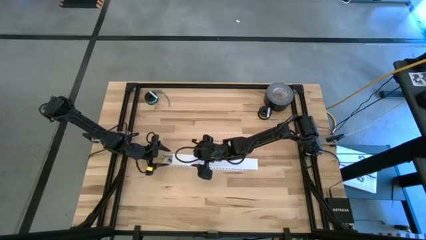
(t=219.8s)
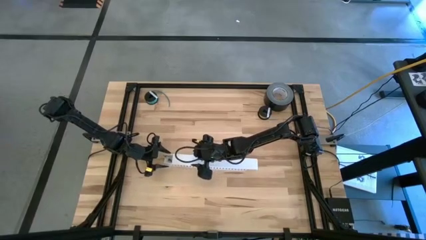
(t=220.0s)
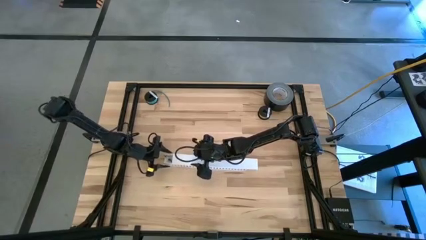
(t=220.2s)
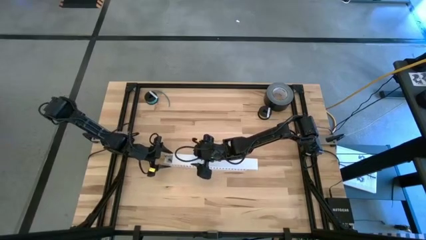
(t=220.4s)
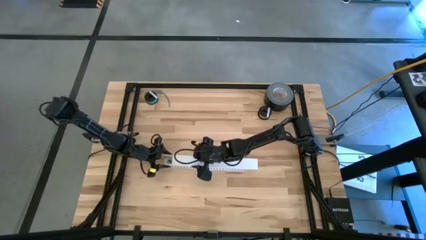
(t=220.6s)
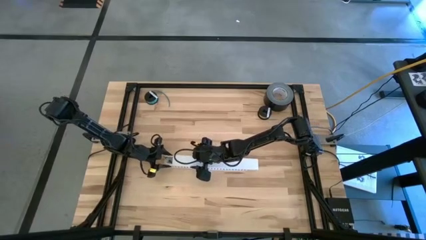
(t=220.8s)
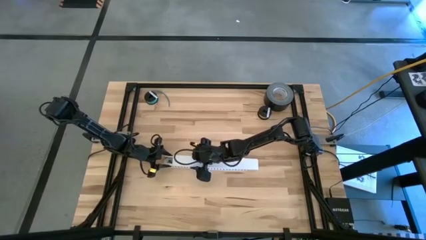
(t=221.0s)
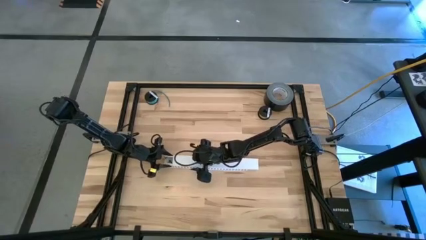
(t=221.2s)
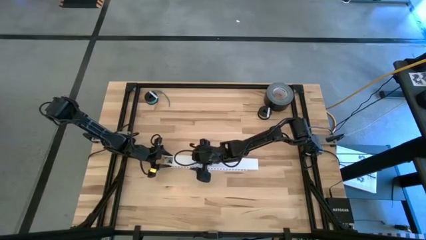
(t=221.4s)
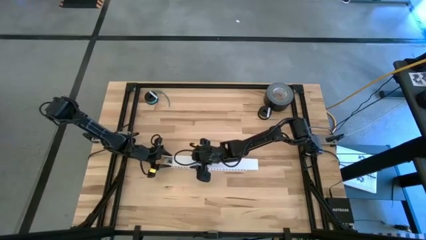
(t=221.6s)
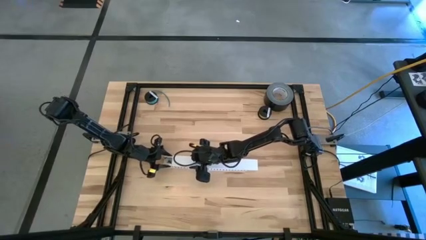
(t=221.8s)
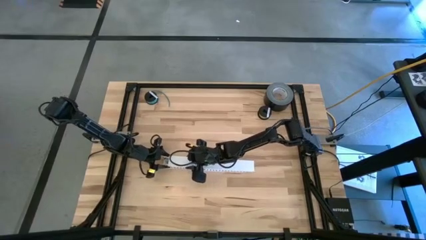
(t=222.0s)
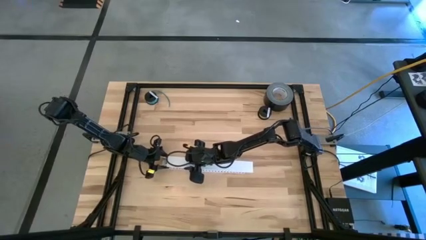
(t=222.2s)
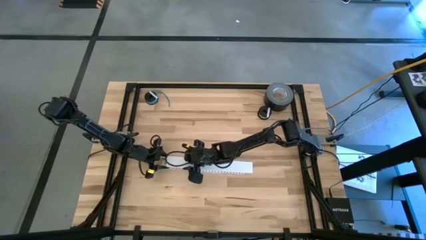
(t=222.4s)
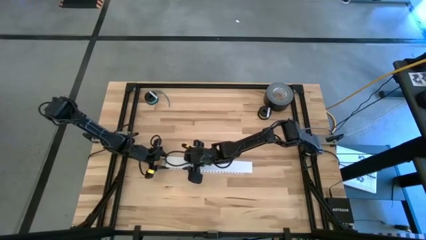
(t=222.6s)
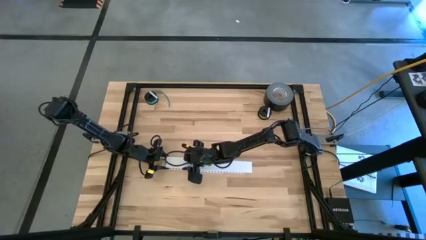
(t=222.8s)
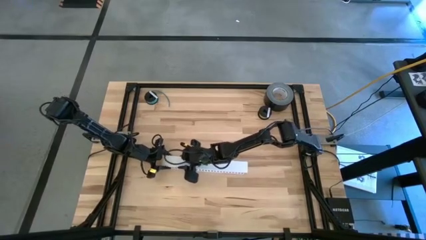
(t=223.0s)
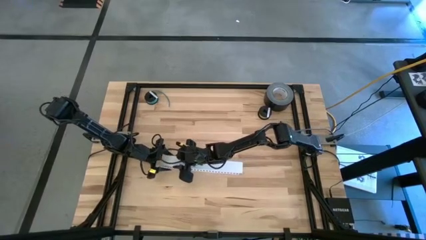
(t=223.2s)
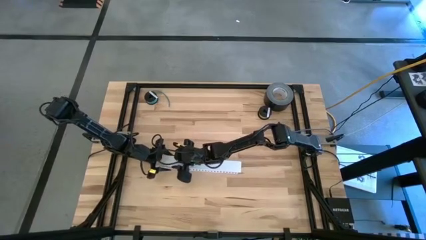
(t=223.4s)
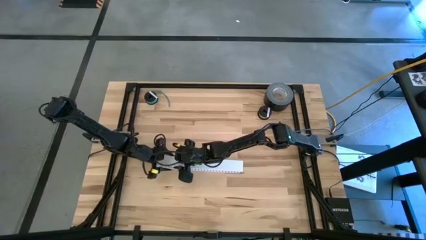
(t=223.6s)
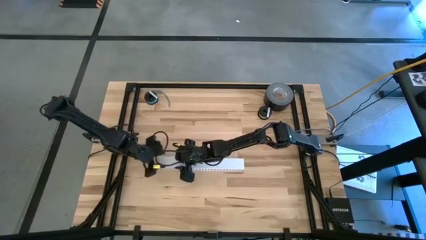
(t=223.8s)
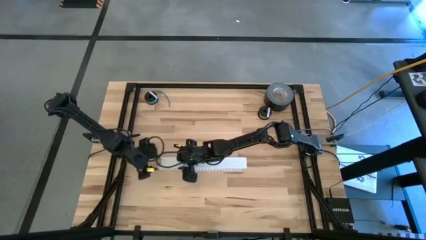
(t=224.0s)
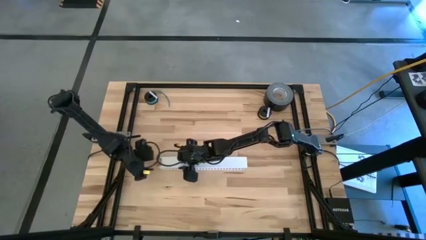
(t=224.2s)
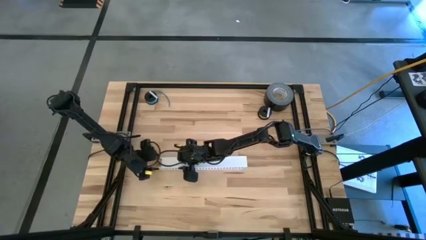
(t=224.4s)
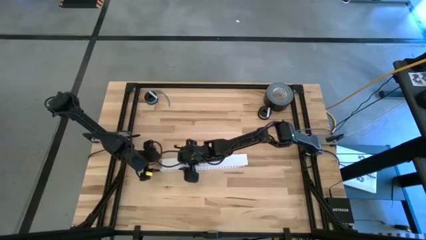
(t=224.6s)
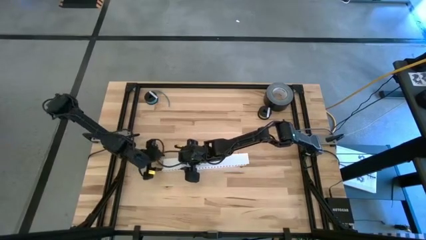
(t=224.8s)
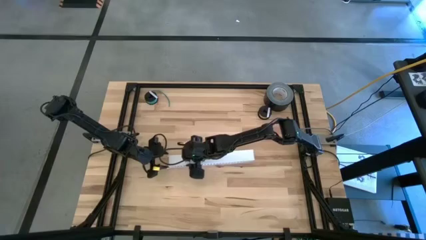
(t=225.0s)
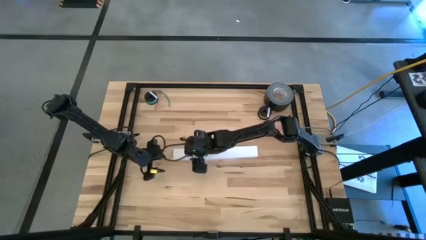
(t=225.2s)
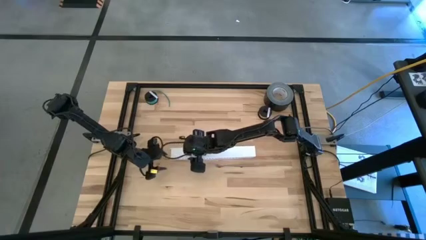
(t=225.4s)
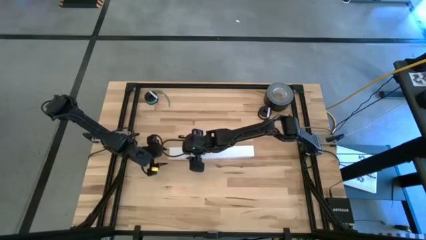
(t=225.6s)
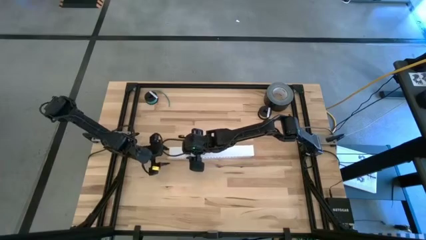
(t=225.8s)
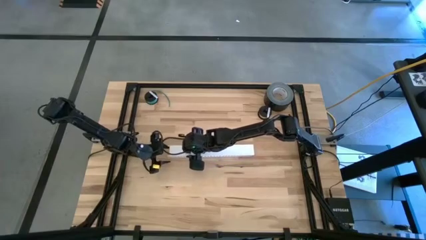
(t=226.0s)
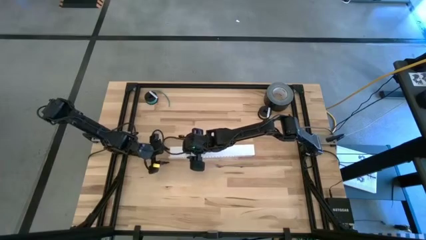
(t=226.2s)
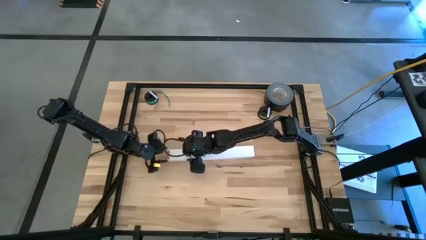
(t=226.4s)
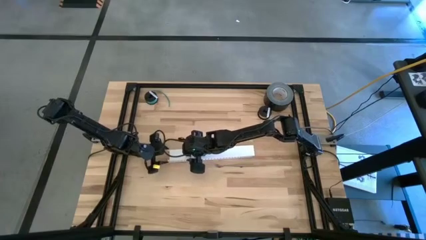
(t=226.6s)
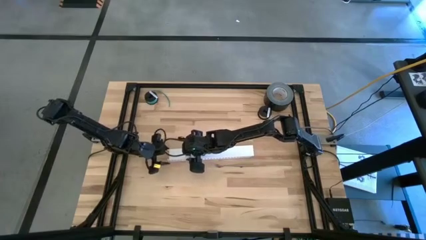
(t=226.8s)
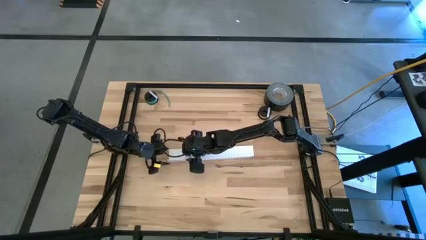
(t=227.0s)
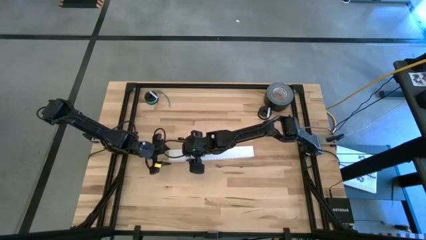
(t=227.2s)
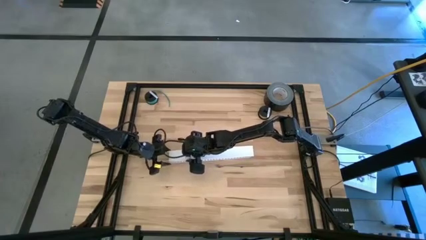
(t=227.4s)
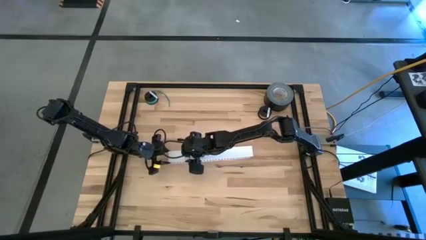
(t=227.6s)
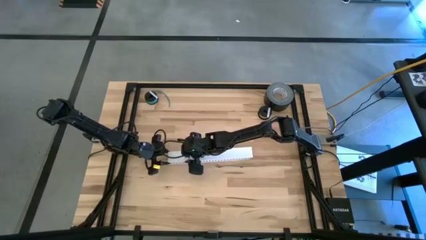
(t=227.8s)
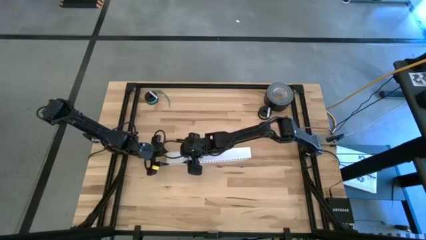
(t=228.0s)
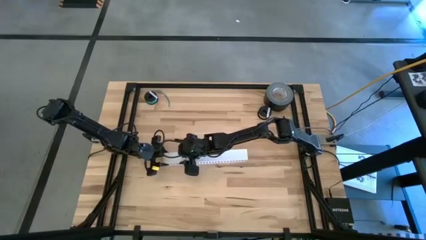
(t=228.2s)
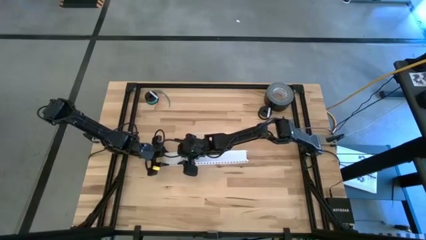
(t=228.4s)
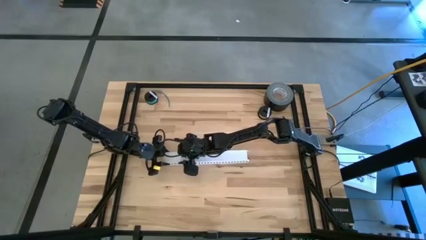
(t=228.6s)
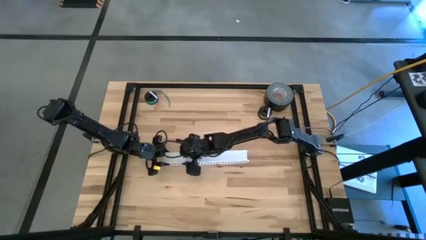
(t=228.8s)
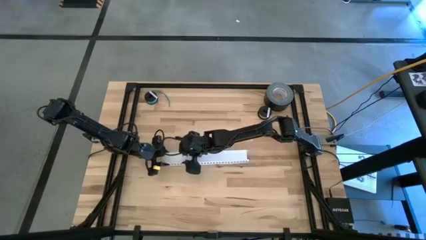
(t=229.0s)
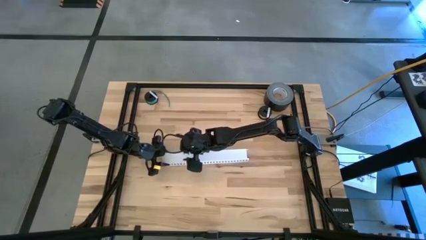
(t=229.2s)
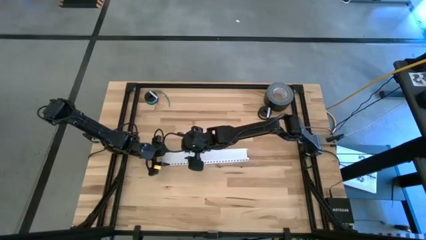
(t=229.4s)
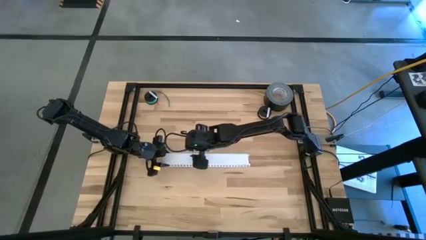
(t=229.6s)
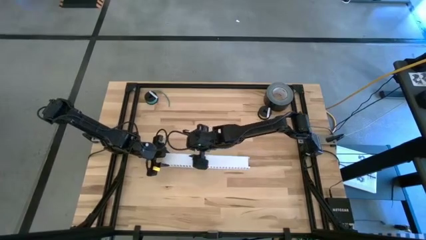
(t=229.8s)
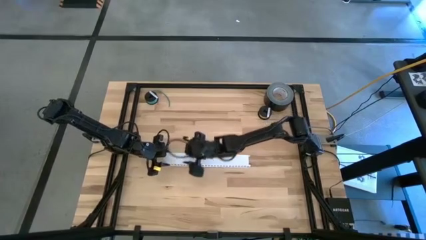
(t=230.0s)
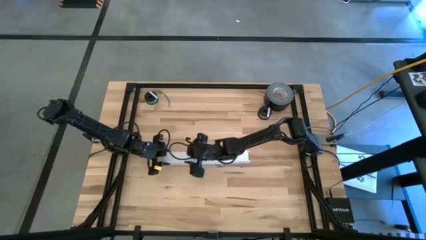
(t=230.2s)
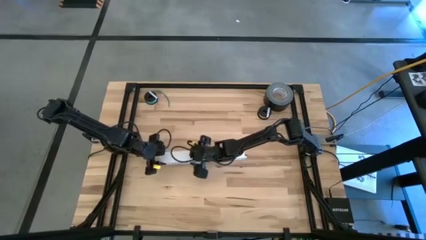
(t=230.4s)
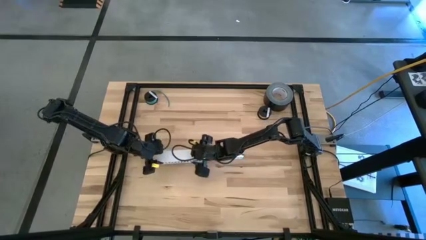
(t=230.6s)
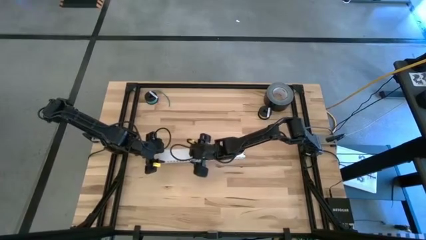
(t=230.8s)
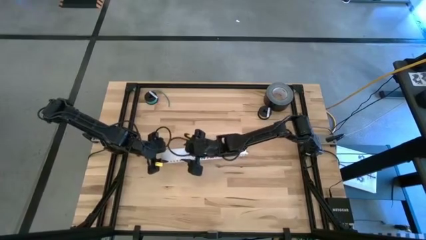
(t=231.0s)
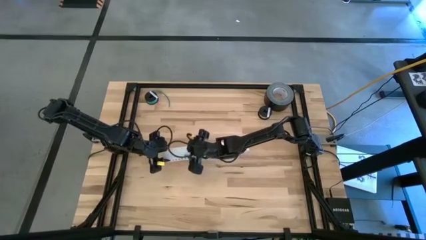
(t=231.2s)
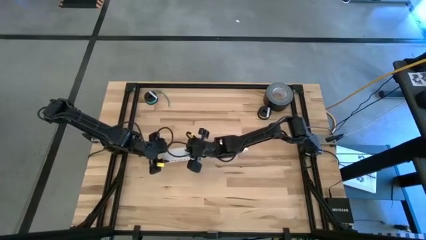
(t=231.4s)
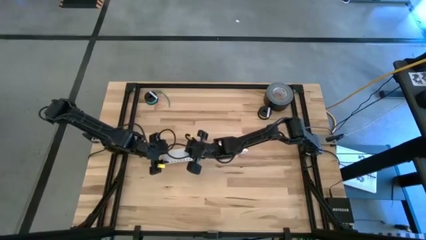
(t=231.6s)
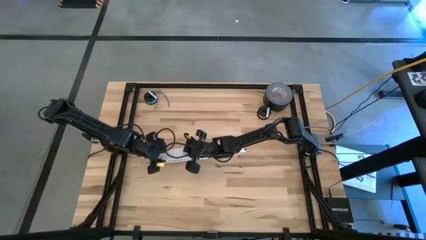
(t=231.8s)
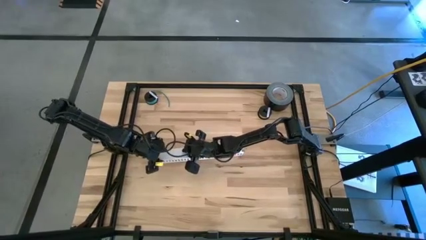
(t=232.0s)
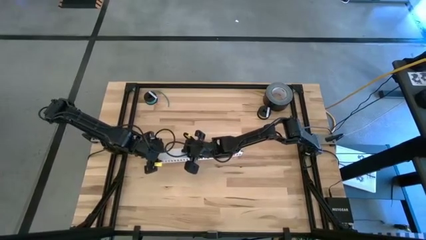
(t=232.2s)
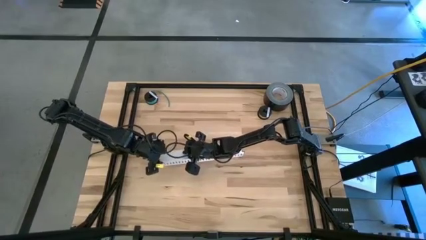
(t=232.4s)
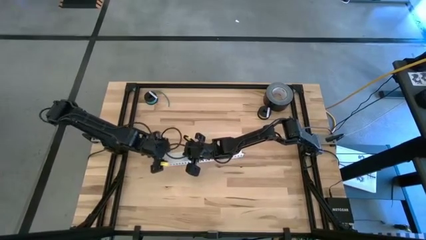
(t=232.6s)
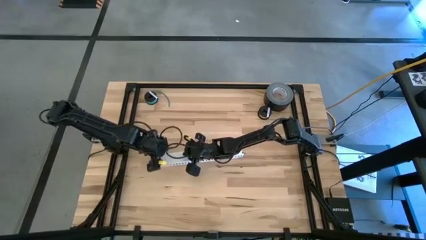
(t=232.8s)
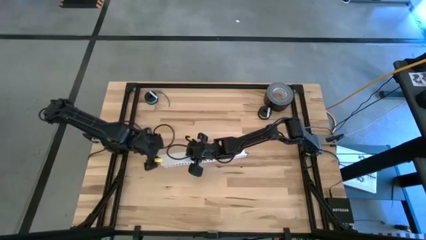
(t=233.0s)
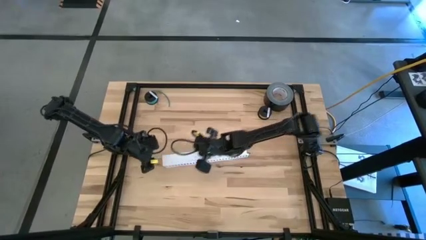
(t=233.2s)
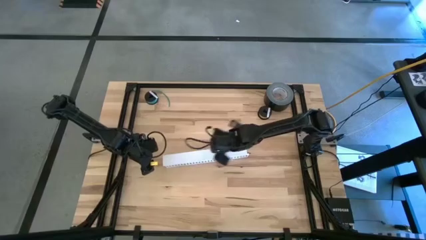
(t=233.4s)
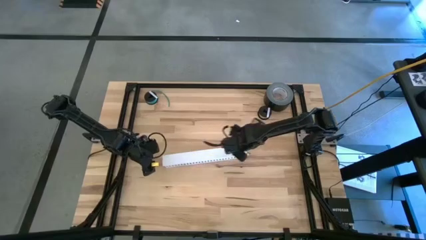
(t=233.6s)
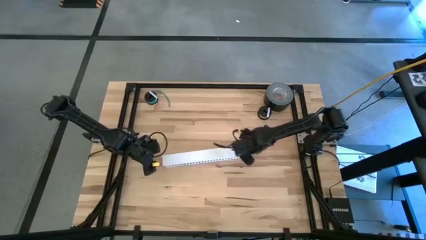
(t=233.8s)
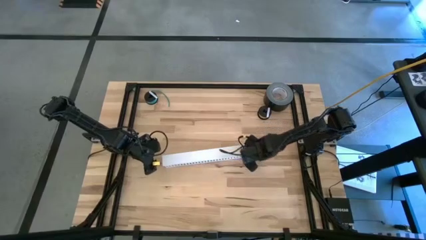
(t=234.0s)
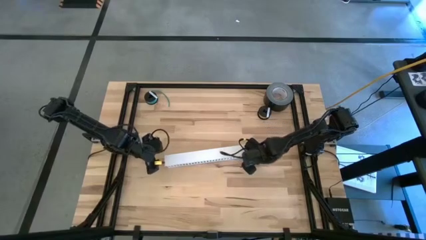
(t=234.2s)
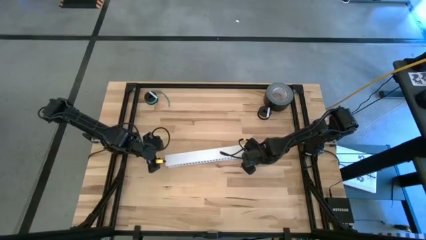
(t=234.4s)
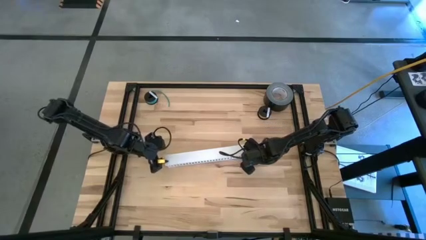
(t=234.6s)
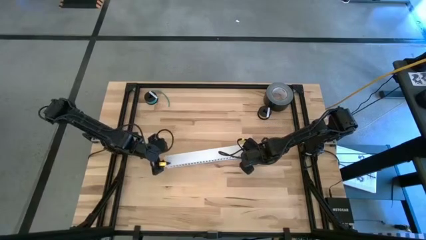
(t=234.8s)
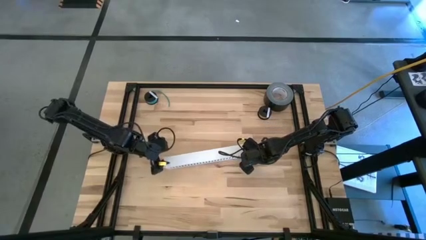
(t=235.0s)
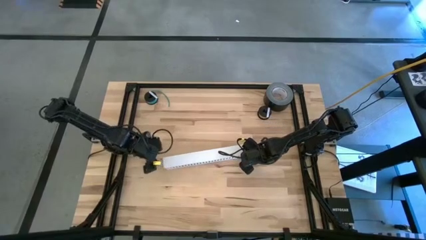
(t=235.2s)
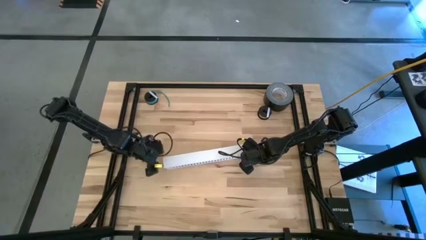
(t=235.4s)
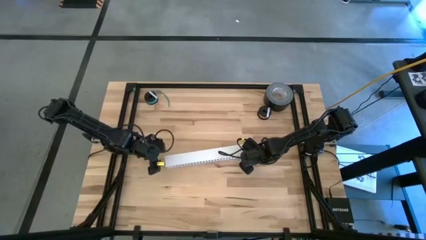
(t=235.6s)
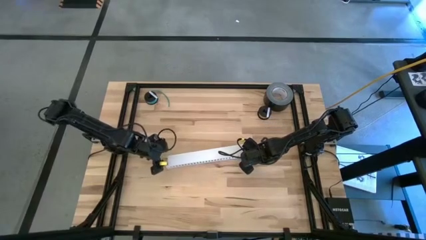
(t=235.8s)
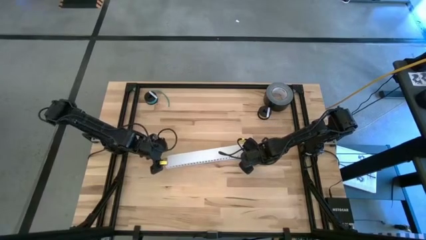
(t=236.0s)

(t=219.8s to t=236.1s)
Task: Ziptie cables
Close the white cable duct
